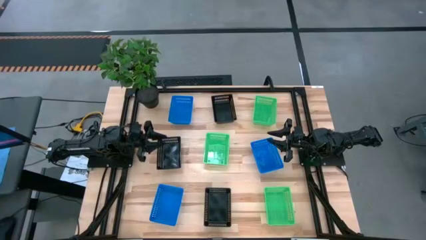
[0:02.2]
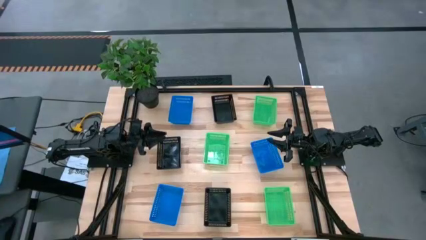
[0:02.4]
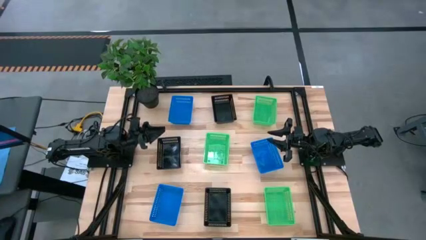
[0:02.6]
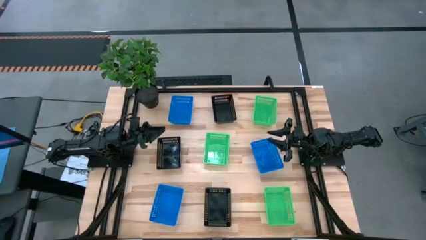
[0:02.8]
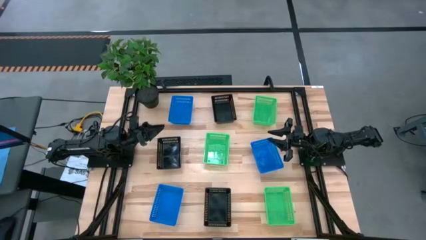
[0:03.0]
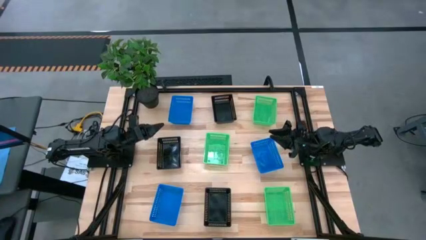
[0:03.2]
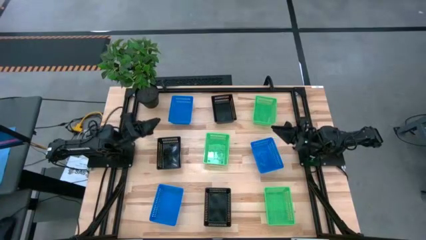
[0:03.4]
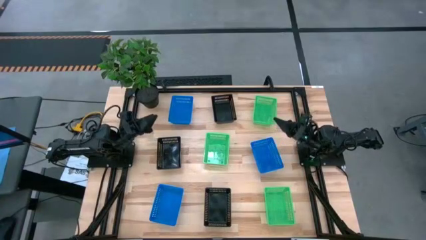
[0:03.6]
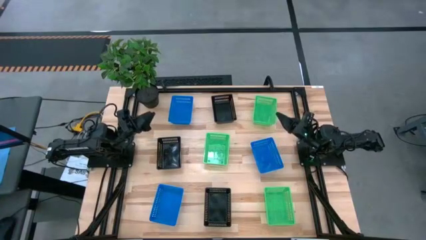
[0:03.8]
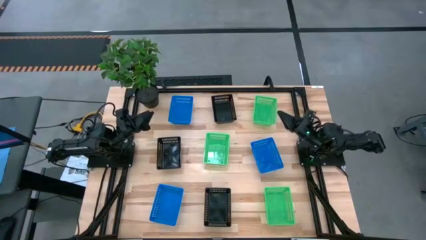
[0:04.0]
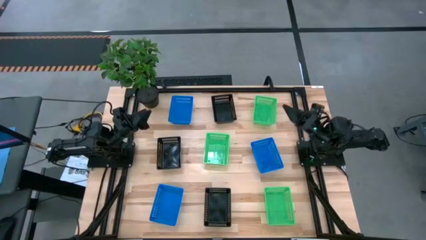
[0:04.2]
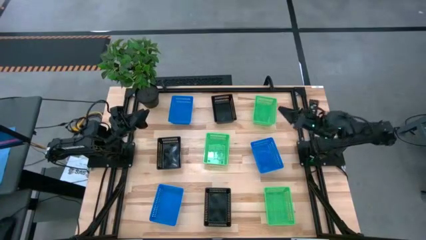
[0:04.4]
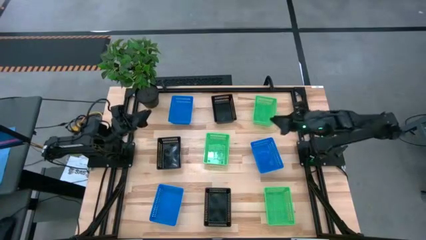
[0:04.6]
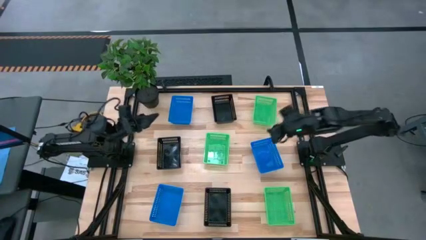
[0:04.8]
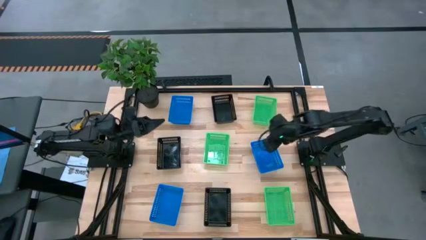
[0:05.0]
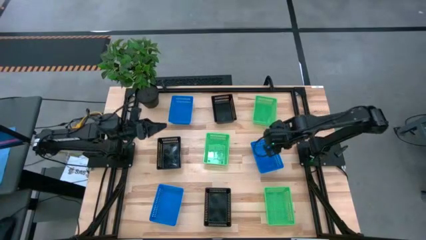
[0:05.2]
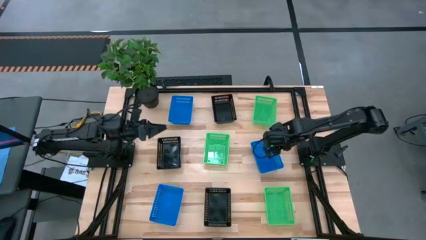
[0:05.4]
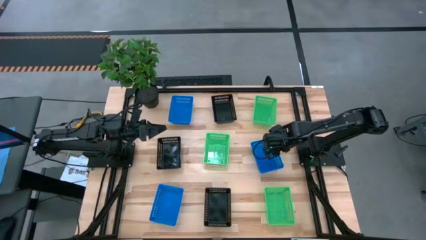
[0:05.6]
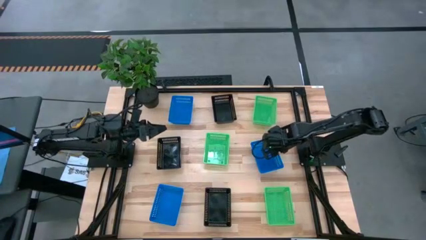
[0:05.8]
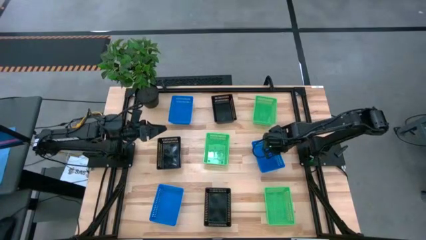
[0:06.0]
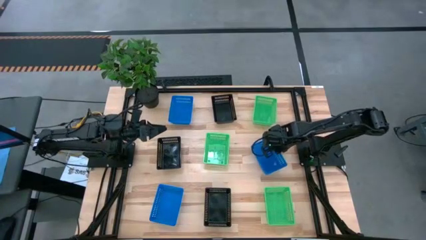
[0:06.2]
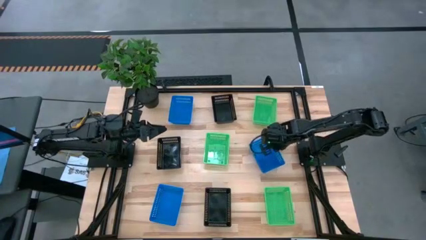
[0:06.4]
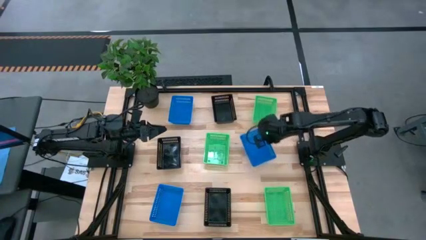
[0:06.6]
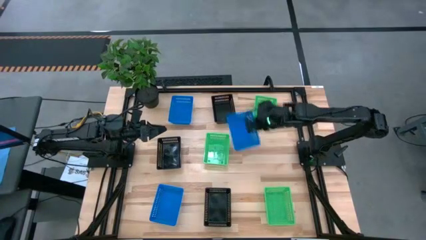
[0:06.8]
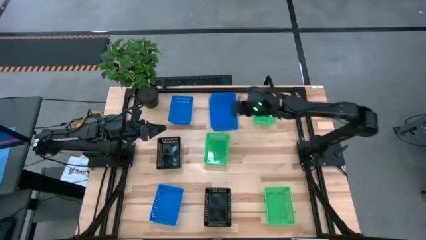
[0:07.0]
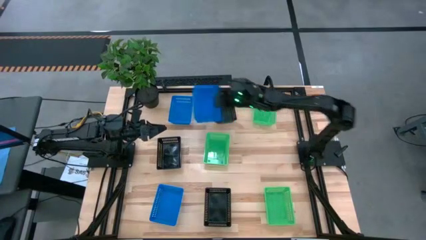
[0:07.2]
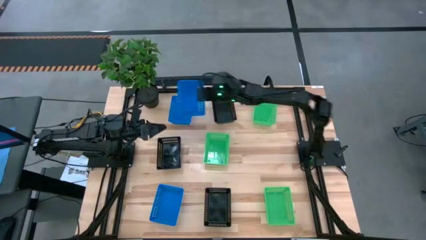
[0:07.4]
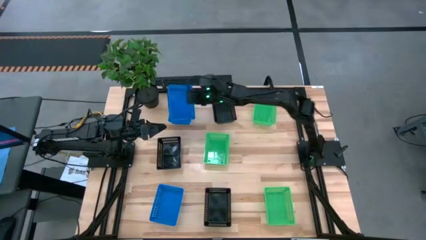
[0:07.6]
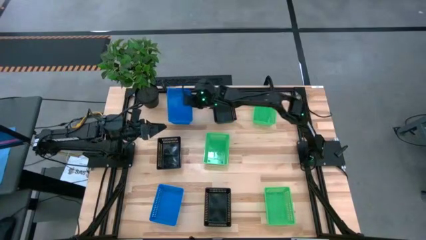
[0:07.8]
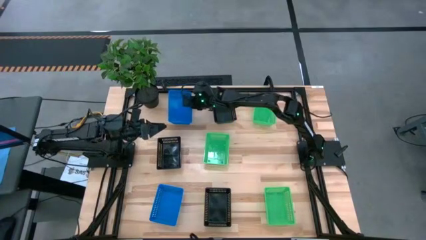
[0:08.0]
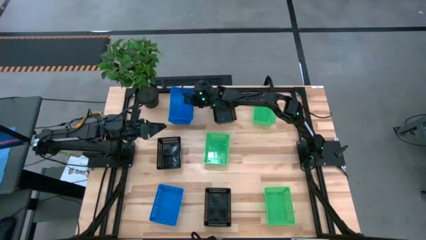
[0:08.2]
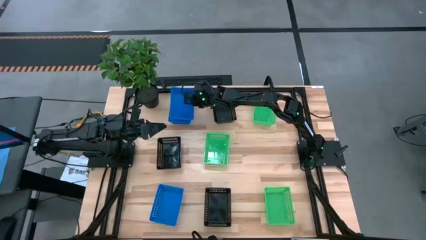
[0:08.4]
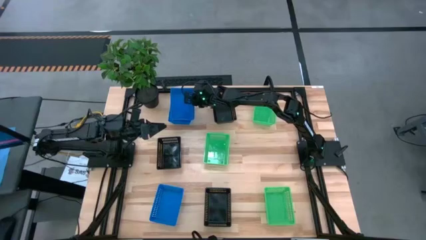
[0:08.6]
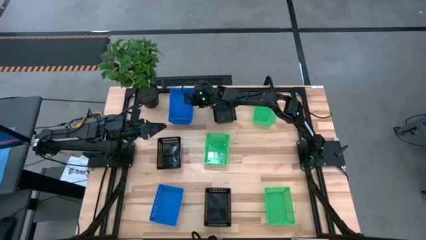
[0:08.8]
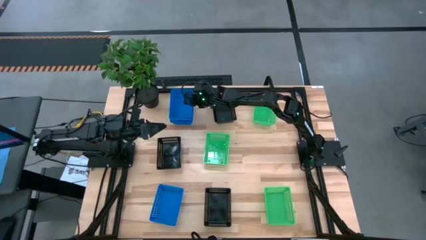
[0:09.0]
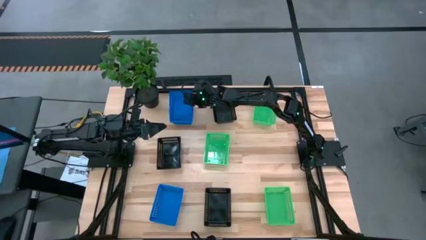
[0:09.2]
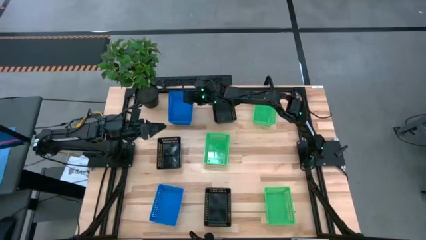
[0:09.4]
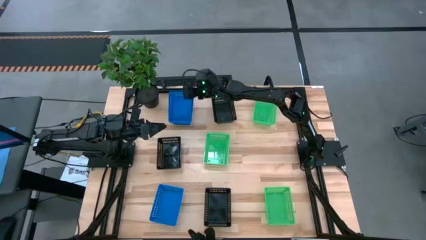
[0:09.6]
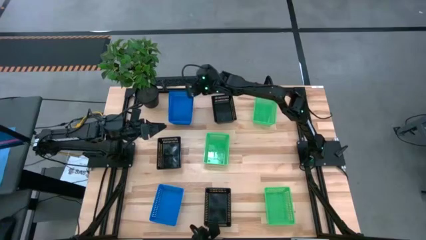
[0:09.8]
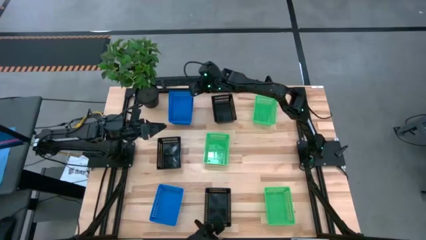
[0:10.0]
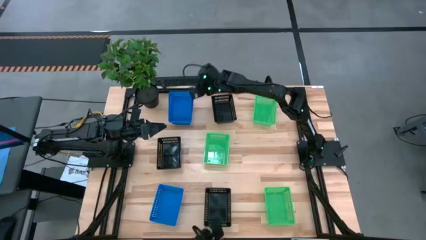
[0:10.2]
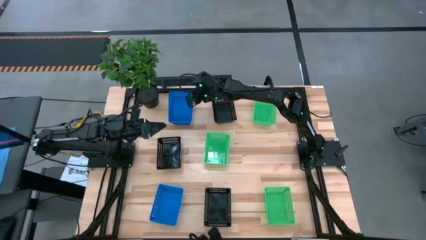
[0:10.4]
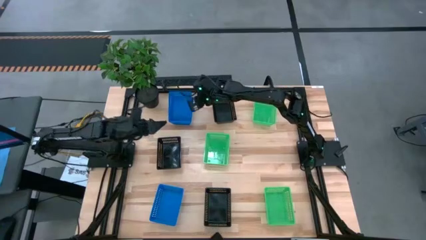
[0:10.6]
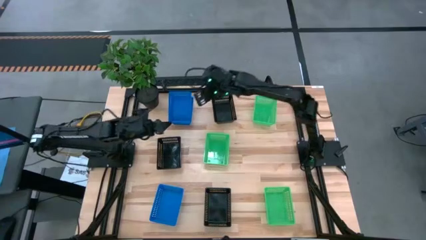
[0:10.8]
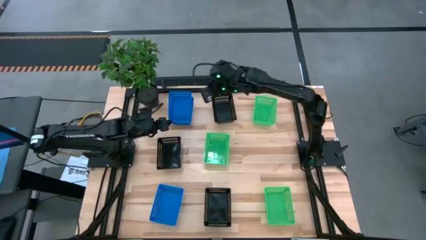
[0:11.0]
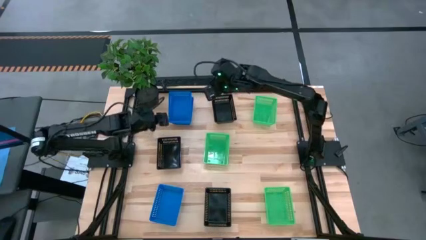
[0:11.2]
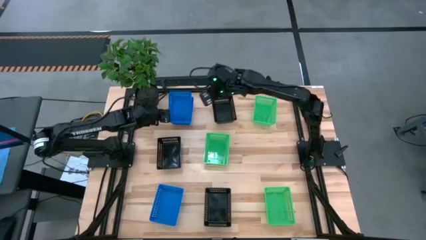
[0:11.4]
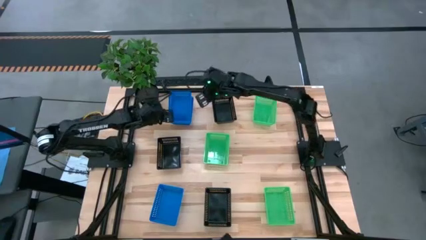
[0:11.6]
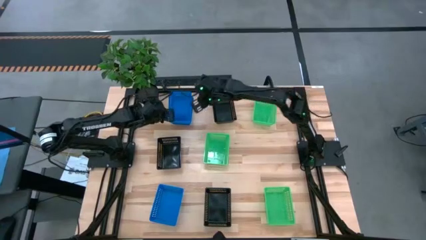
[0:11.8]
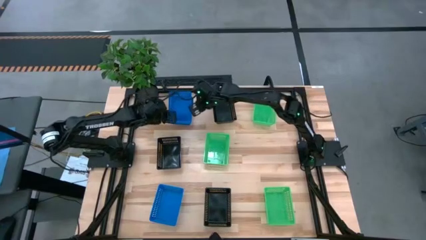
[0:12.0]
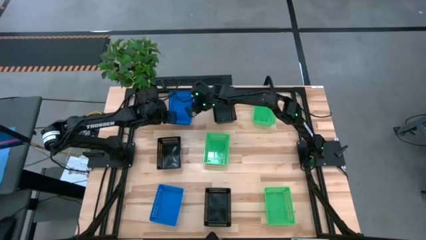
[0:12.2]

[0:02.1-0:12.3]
Stack the middle blue bin on the top blue bin

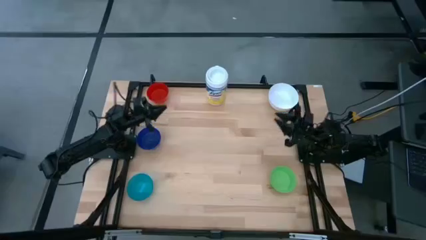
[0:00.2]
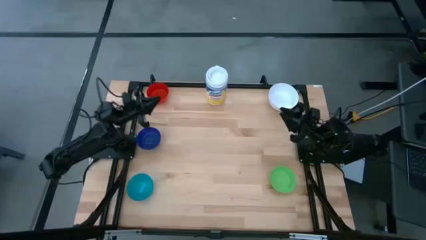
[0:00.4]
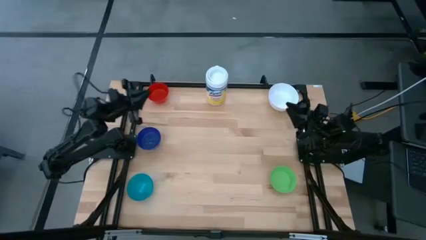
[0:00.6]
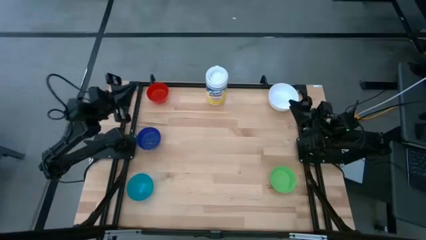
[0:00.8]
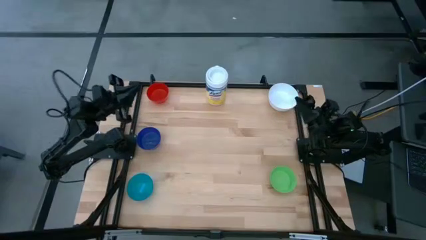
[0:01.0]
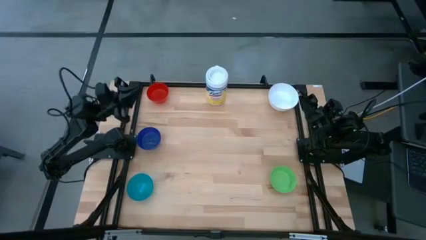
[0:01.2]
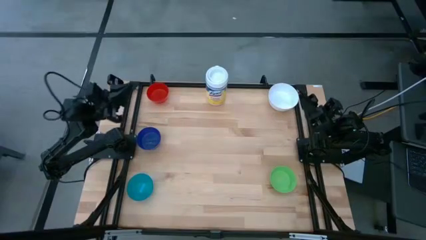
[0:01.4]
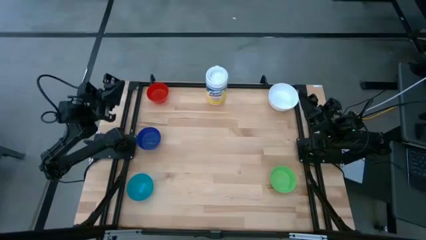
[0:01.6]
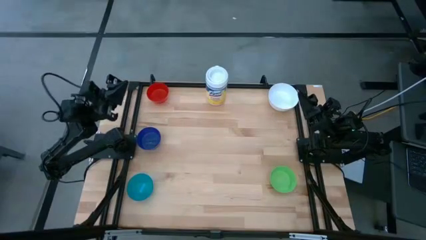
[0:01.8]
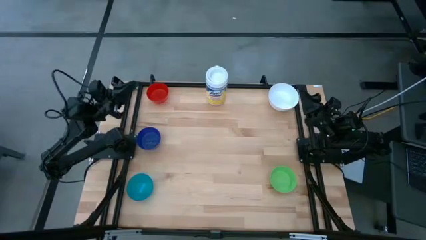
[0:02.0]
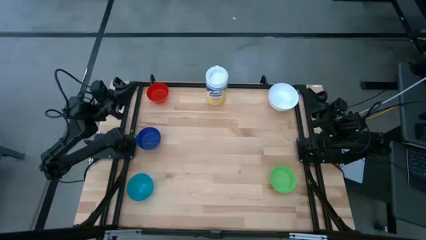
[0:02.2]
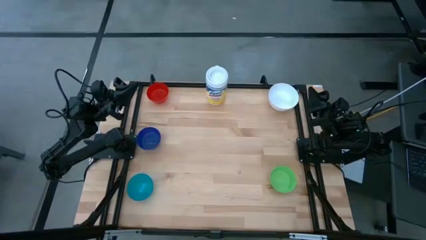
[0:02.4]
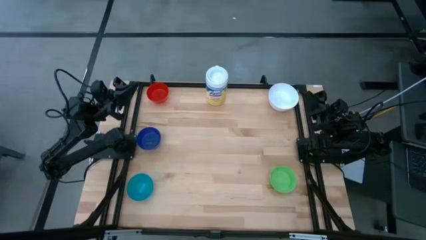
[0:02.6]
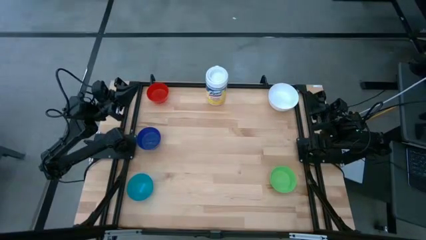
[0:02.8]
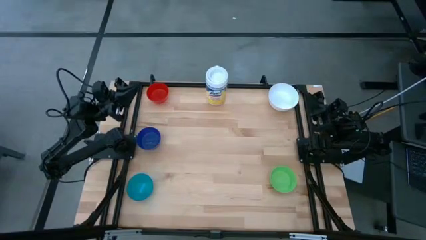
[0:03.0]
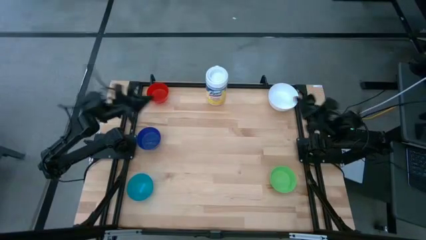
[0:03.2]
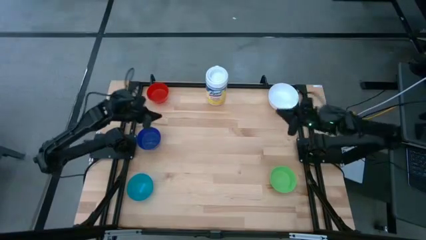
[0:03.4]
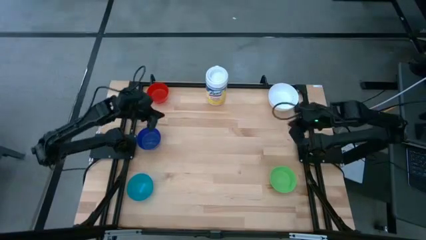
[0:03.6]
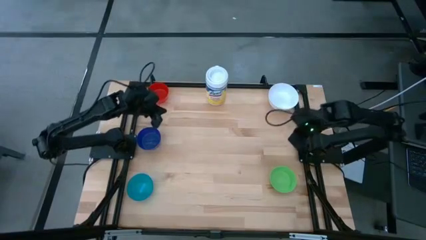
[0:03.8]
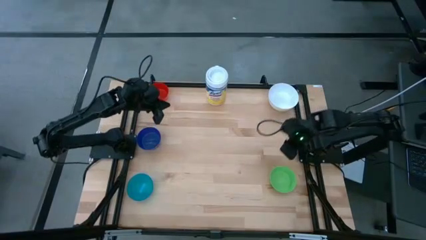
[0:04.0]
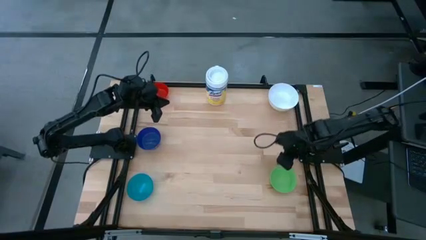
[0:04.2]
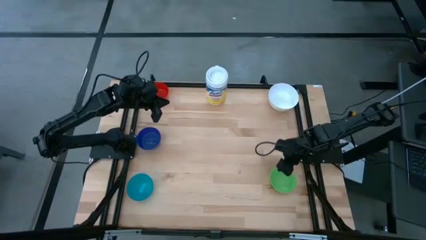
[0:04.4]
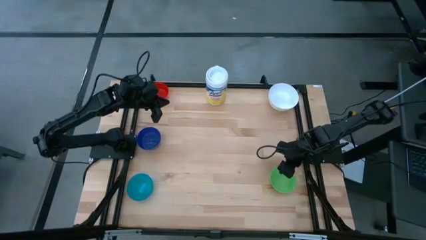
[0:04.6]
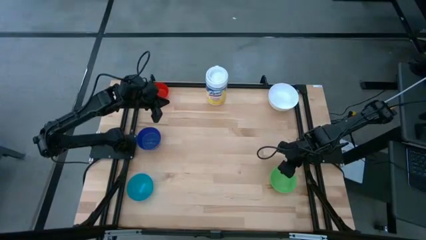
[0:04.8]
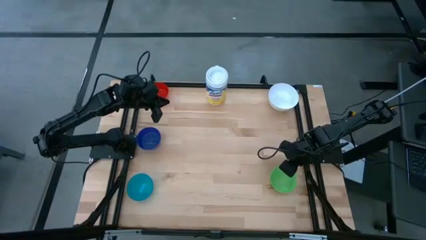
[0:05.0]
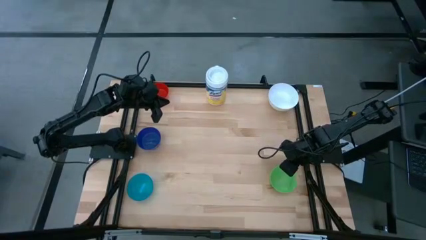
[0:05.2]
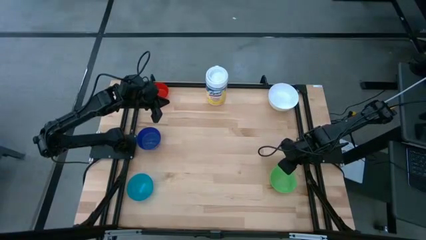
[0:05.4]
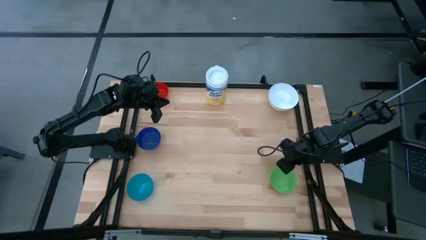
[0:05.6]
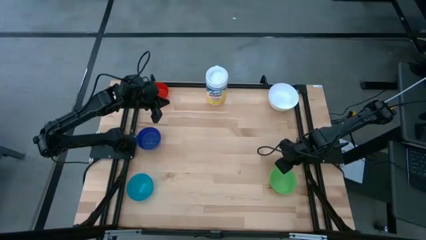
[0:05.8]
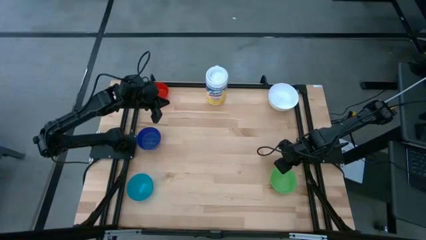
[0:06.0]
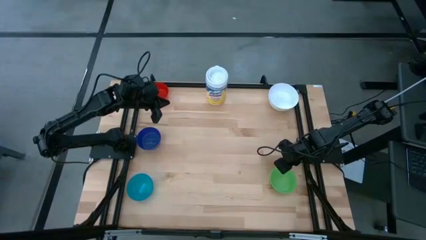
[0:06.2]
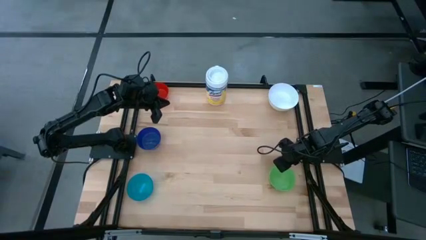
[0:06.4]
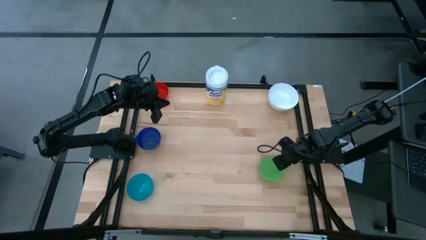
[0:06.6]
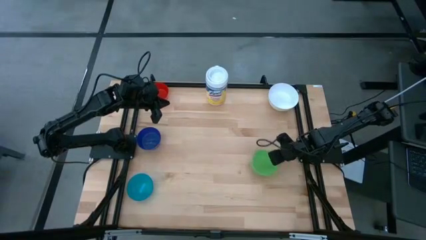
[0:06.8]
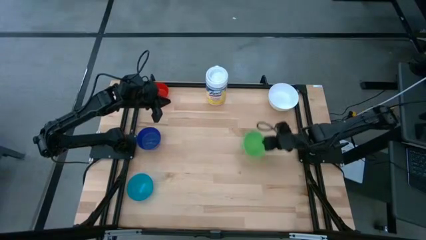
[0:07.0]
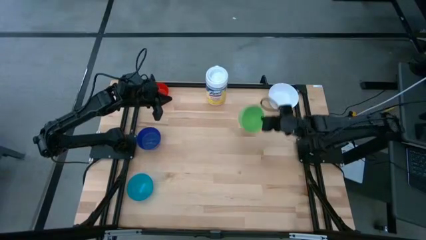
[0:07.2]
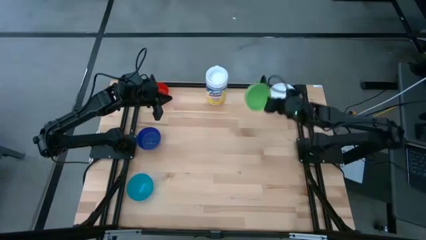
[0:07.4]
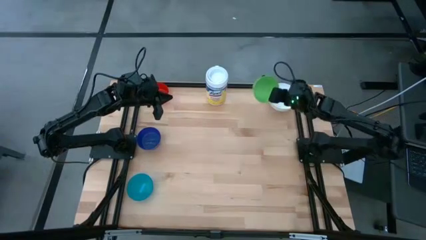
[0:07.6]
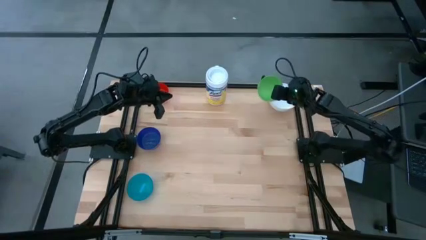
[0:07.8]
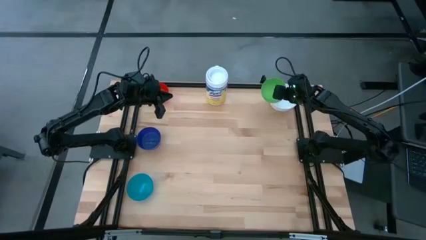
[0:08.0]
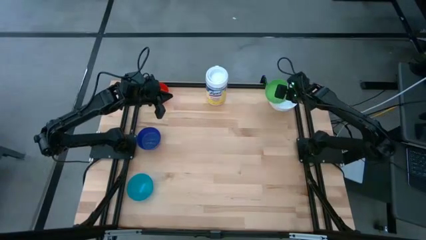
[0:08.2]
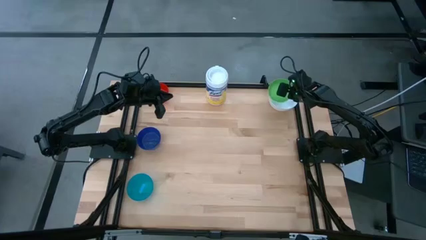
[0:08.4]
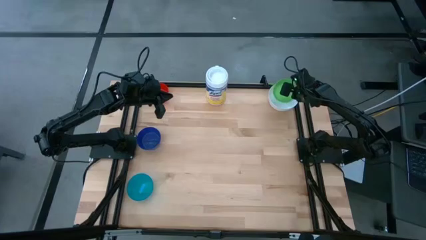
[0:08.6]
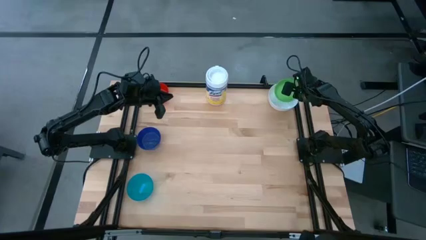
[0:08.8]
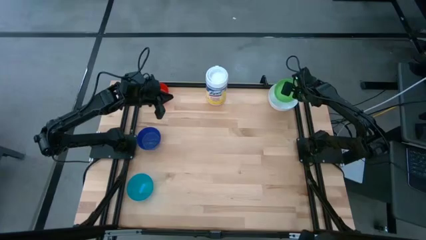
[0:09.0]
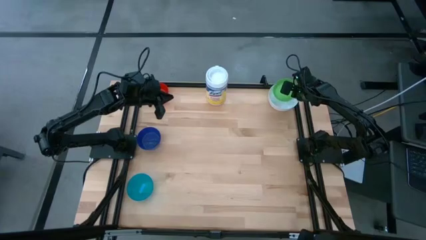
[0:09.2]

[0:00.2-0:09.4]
Stack the green bowl on top of the white bowl
